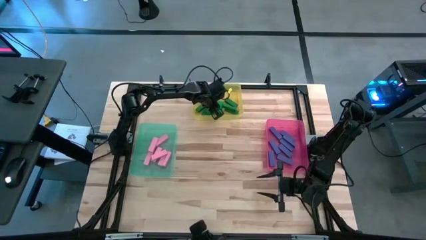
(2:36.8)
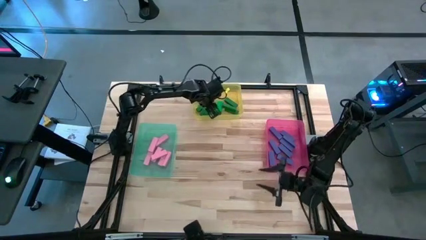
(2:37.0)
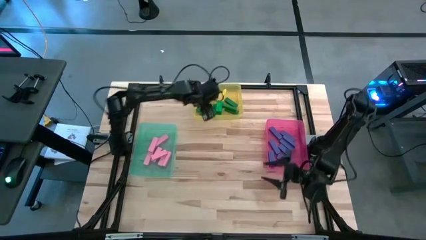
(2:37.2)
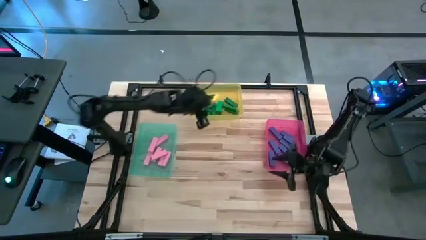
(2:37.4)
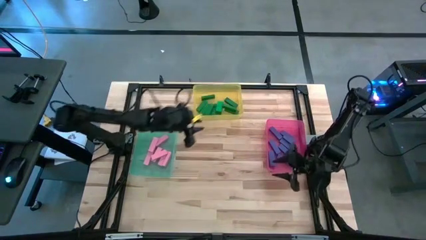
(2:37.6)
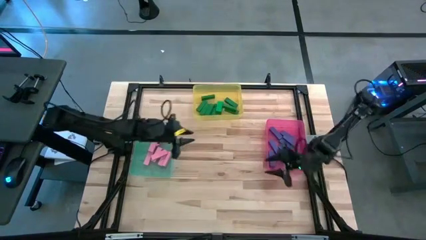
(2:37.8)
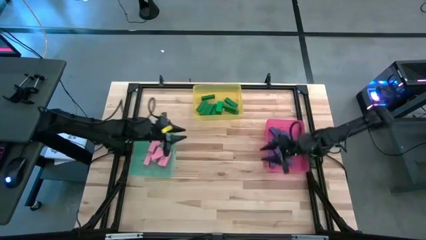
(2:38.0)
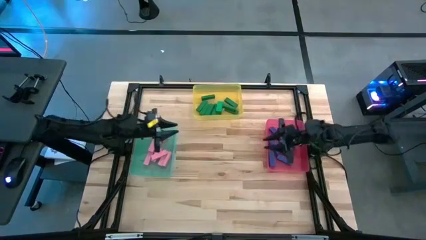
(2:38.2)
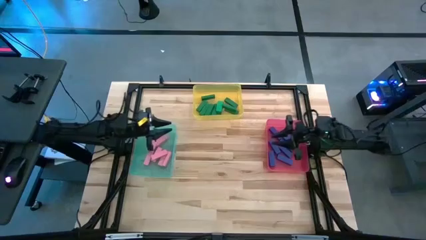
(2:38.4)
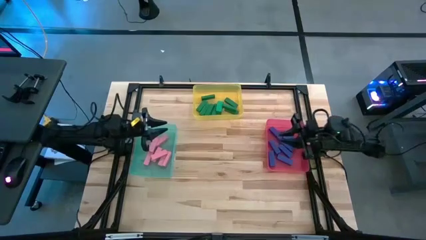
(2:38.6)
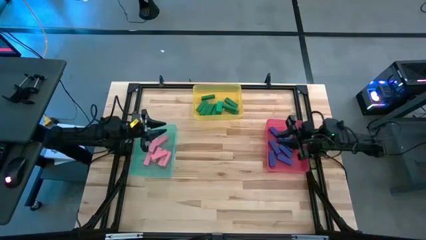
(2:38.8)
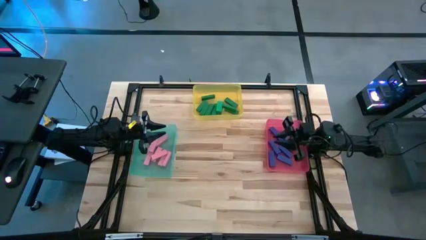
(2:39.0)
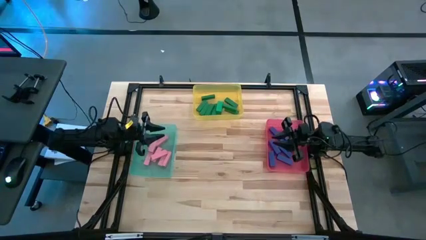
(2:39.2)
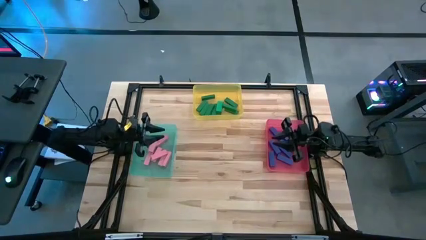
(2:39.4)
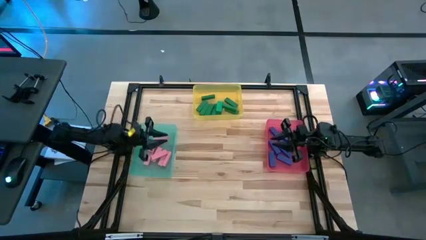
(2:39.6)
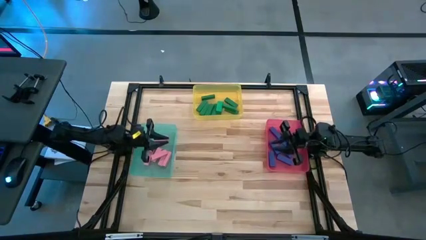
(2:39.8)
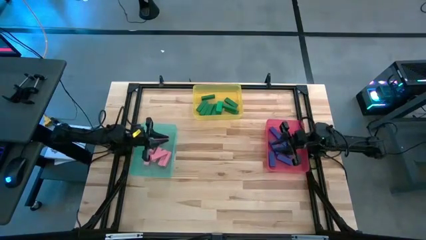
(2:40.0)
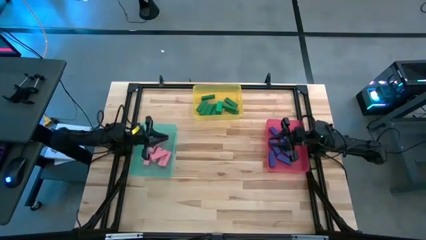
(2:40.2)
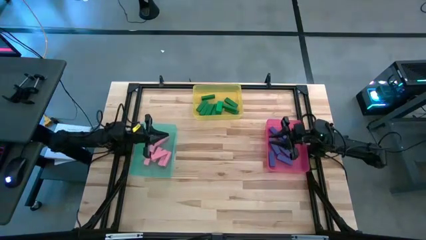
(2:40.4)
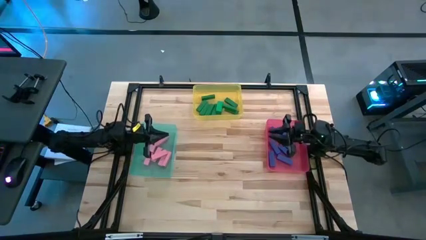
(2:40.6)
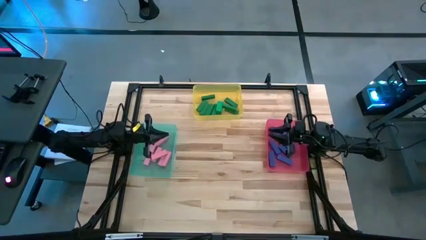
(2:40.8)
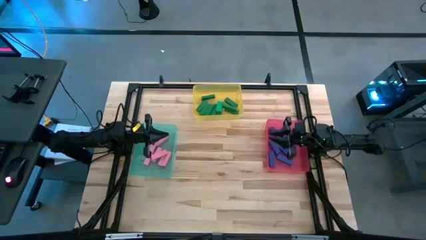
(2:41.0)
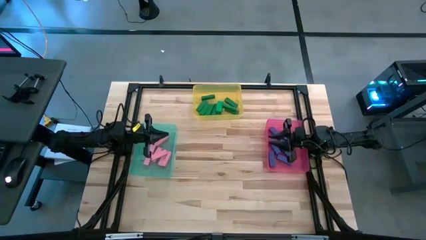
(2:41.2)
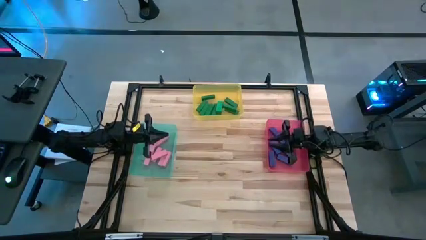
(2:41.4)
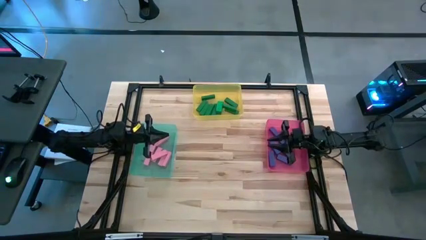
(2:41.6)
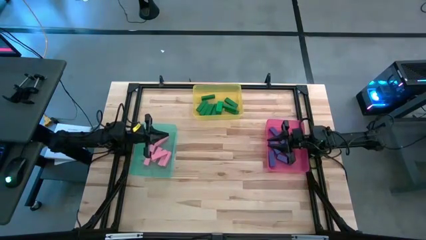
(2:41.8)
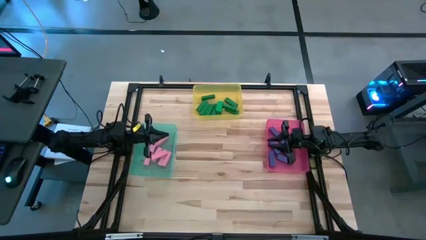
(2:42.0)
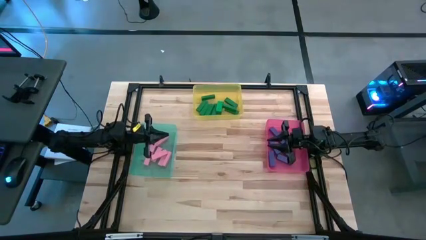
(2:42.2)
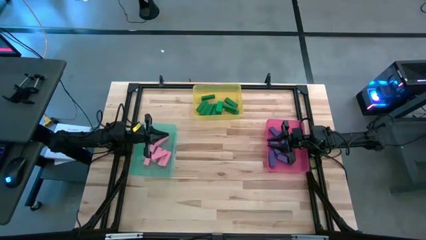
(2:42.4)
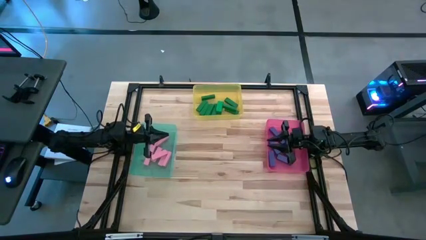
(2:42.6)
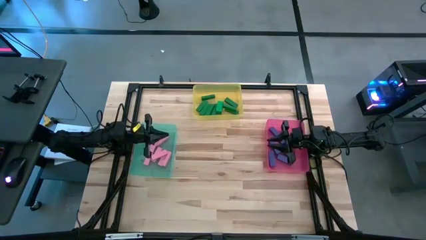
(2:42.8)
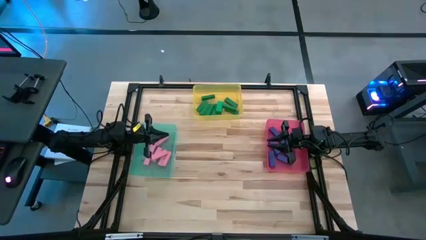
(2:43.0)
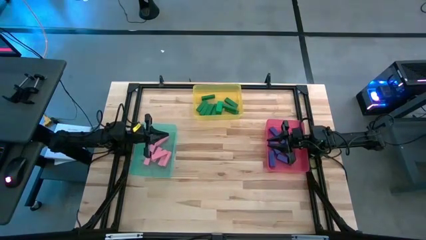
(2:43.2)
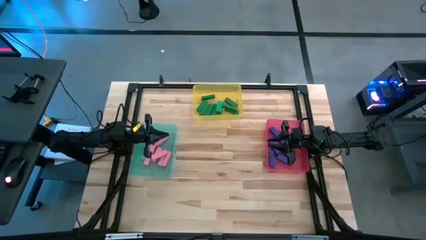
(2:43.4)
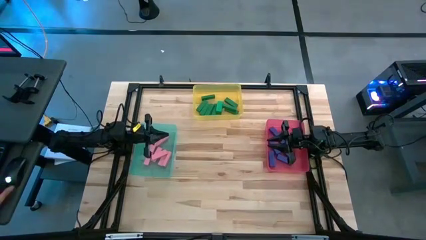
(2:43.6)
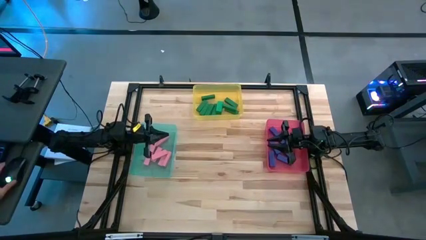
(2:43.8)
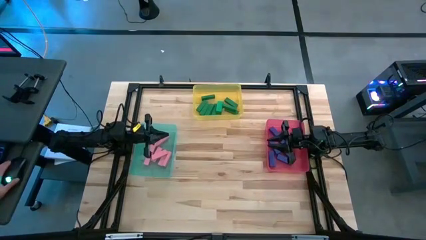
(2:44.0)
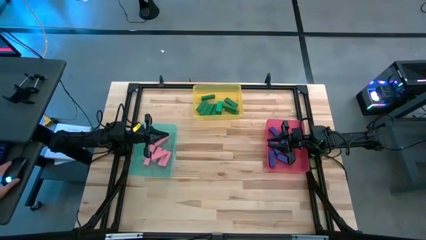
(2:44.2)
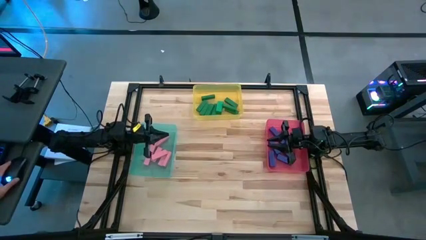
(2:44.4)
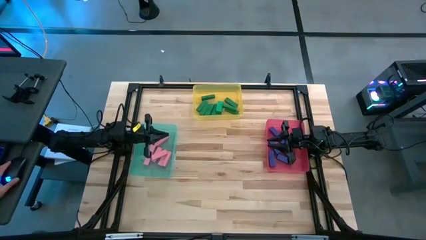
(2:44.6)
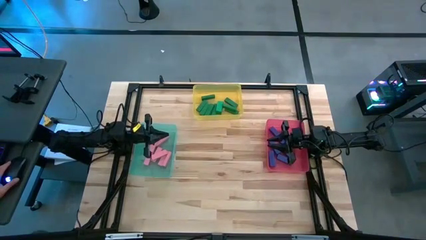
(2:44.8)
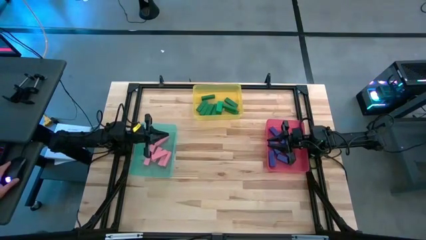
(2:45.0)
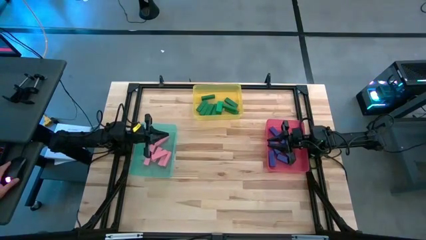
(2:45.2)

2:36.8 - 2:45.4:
Task: Sort blocks
Return to Home Position

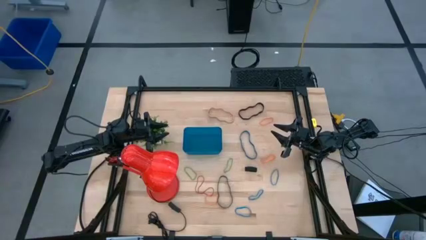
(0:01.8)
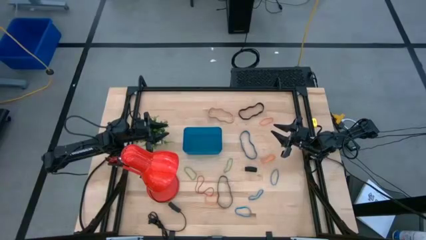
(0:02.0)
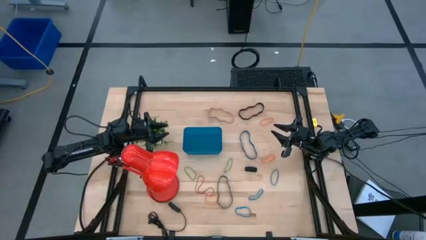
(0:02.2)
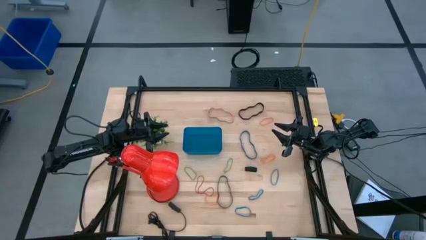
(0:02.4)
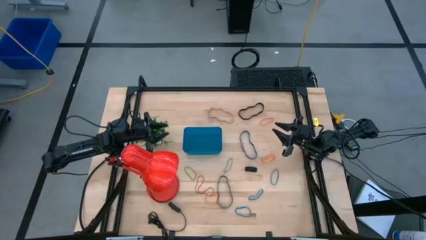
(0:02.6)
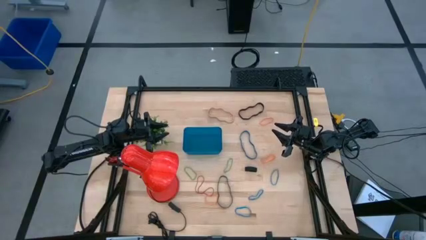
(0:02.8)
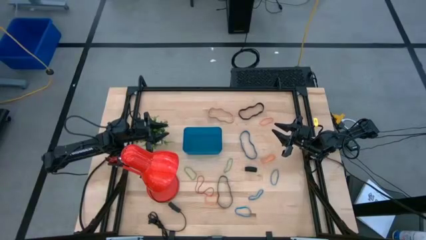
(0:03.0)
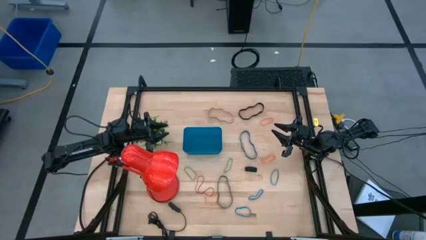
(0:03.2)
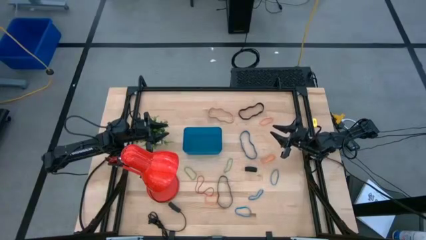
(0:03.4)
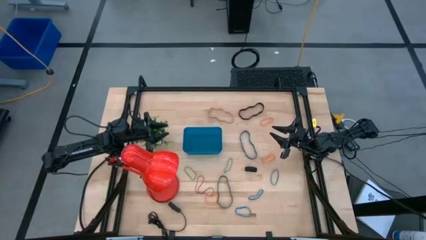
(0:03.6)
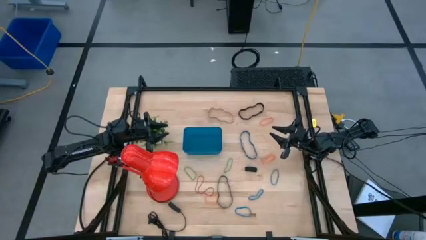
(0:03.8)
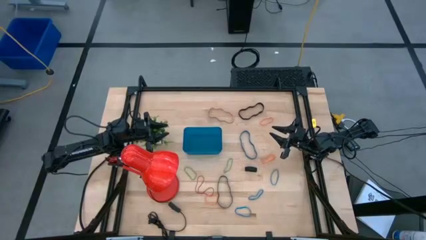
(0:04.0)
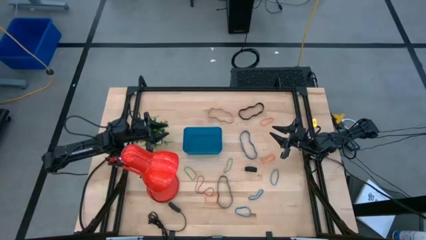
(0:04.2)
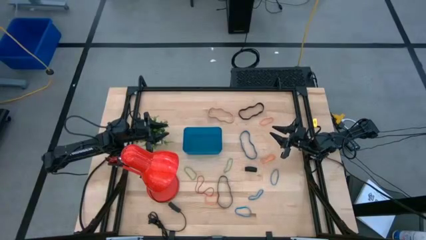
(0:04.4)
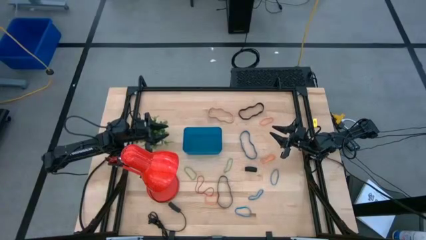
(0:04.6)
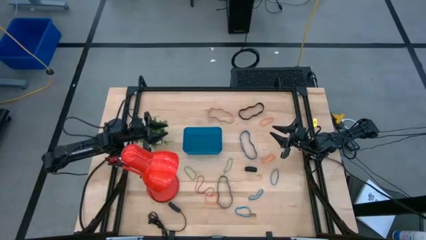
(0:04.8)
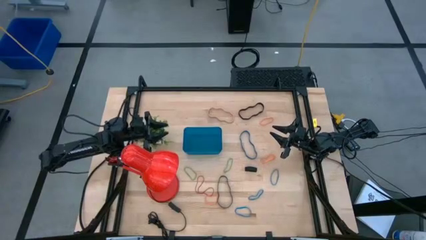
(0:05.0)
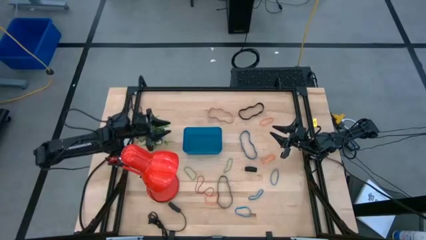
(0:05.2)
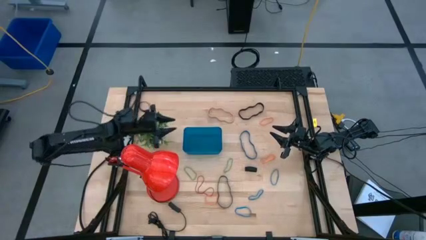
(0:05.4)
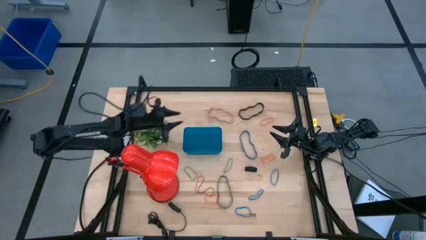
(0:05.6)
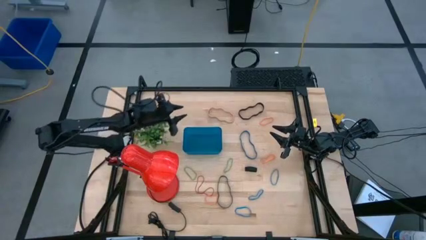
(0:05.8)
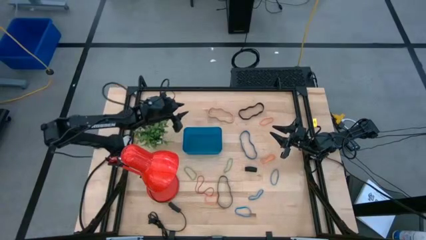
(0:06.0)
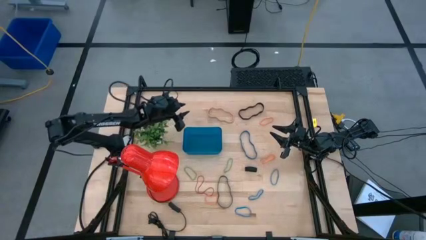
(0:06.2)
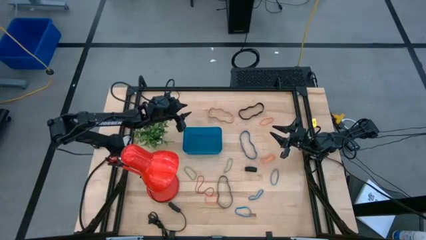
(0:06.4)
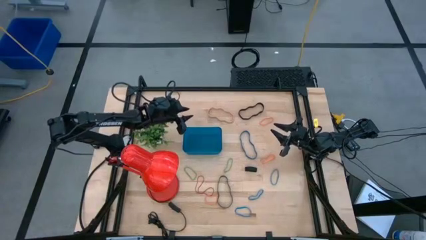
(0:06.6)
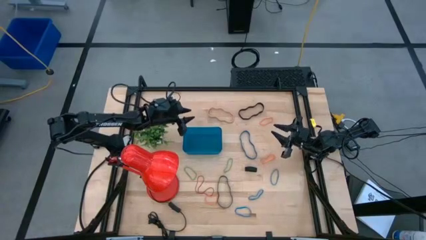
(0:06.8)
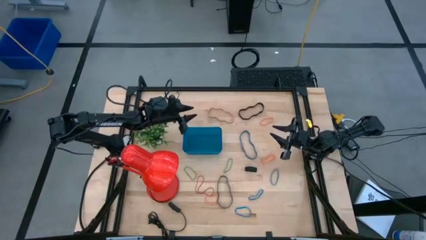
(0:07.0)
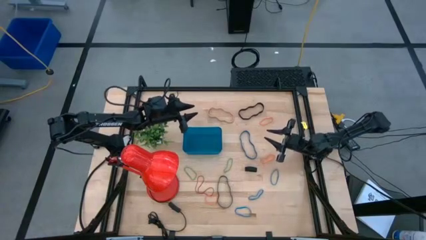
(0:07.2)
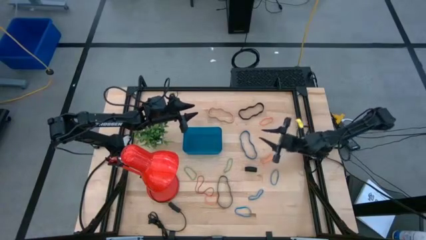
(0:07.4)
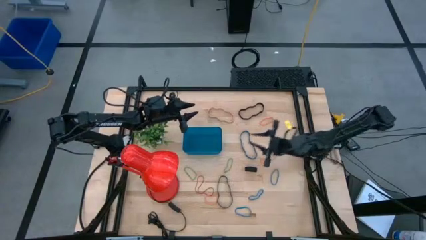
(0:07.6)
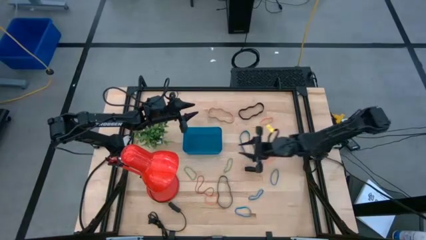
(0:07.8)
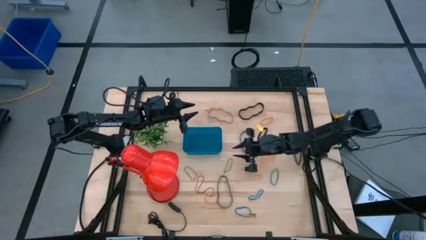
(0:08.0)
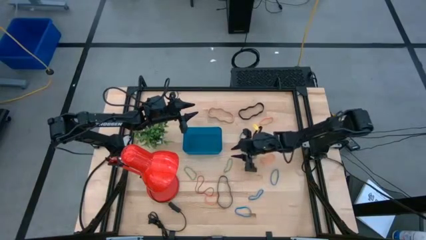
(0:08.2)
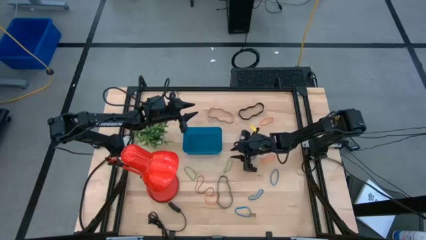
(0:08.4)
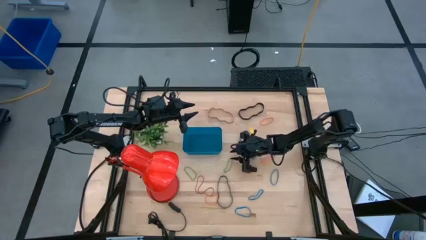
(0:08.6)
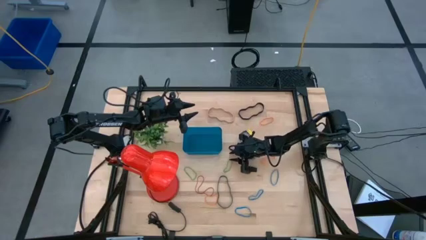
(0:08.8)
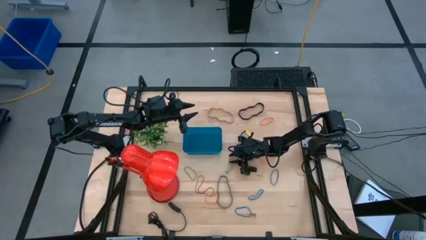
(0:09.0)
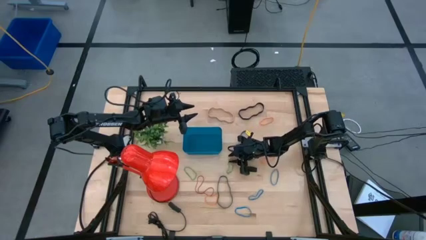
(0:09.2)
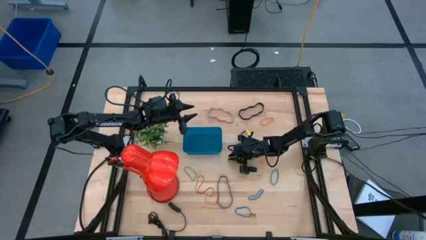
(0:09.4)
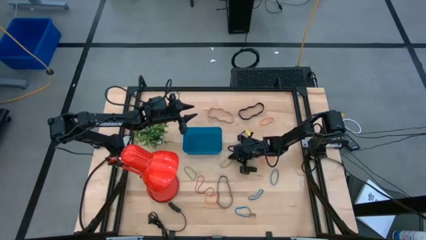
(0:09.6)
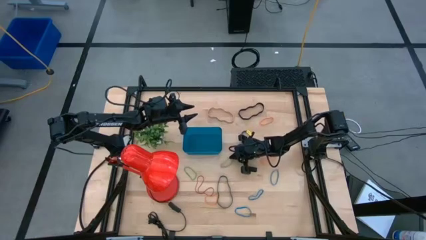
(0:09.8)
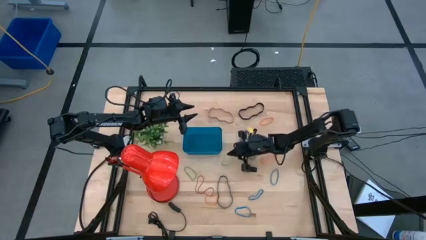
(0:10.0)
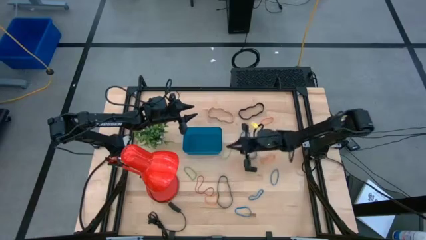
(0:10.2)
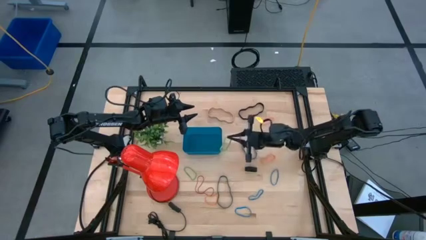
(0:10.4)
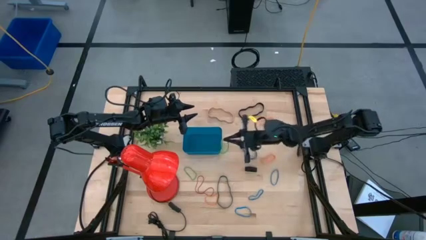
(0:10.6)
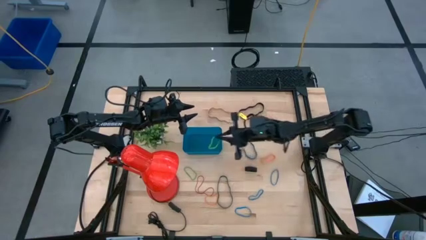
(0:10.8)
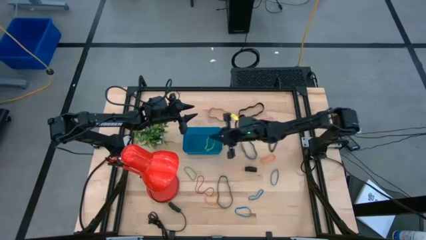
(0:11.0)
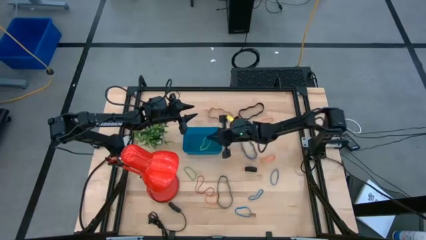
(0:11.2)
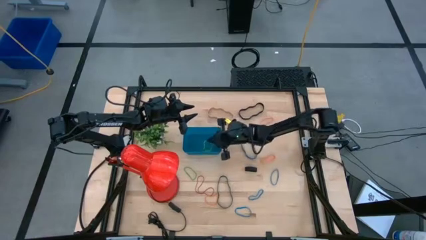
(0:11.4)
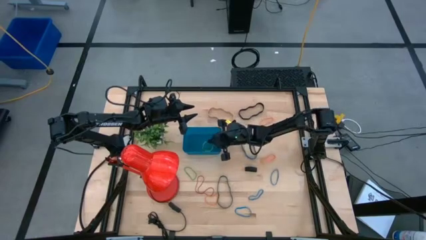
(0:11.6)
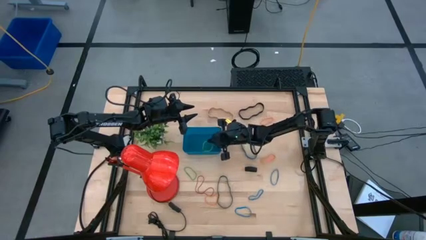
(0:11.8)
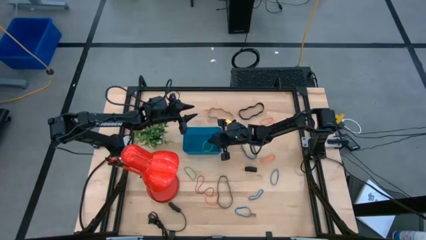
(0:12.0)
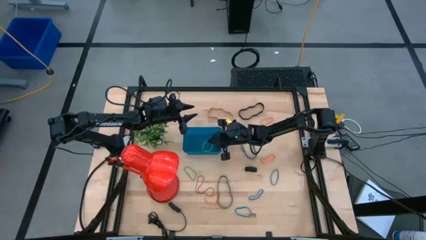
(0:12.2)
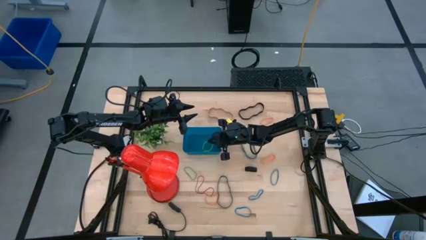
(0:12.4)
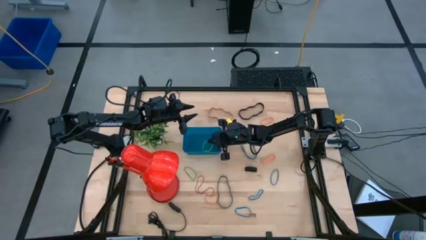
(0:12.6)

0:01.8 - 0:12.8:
Task: Pick and place rubber bands into bin
Put the green rubber band into the blue bin
